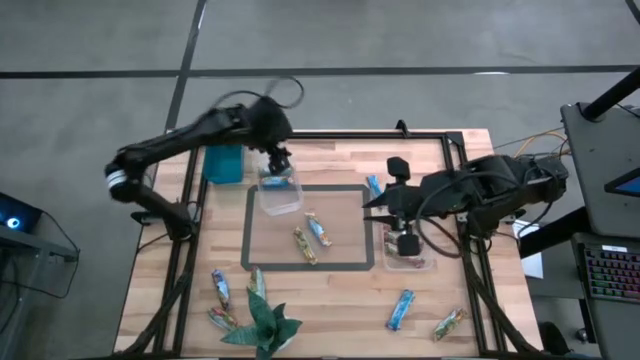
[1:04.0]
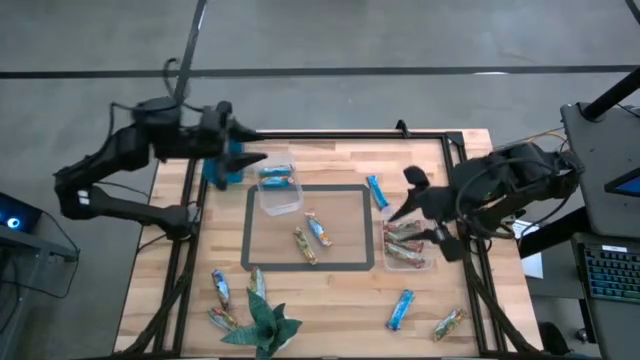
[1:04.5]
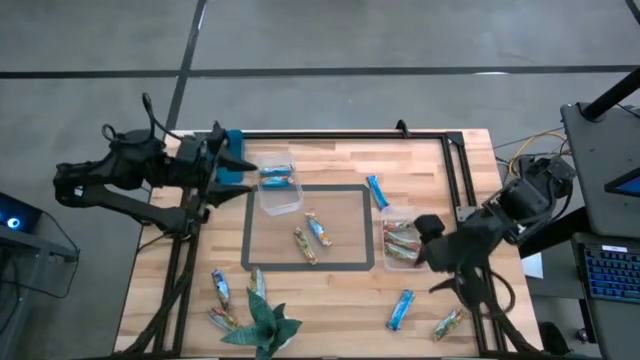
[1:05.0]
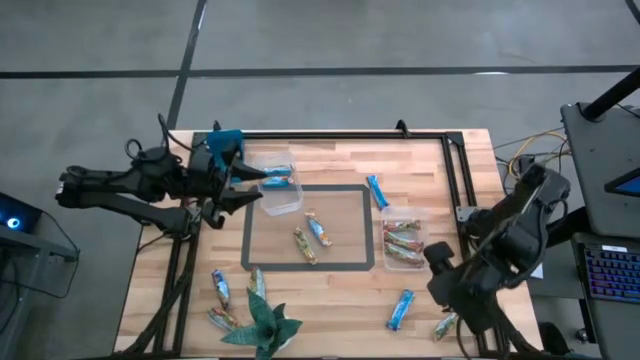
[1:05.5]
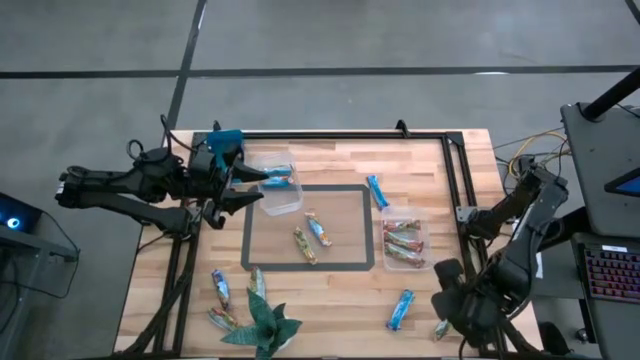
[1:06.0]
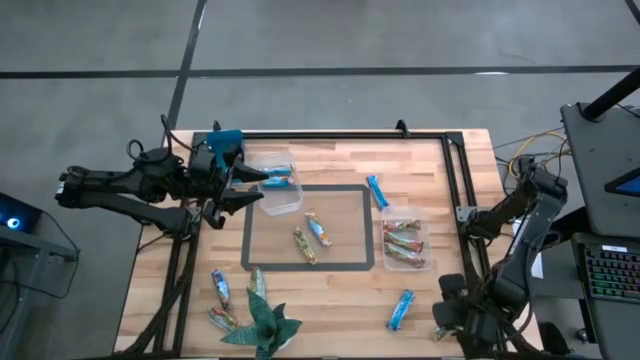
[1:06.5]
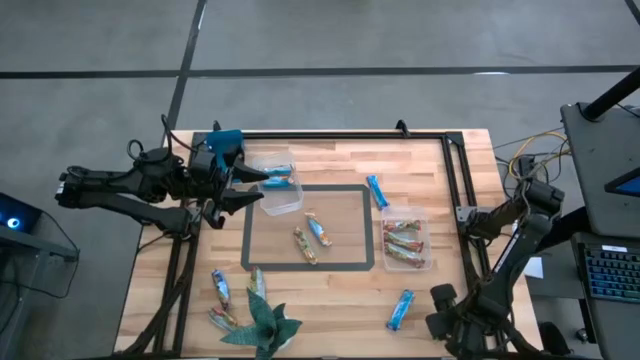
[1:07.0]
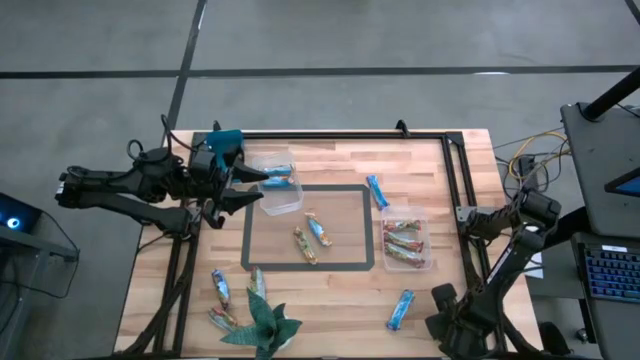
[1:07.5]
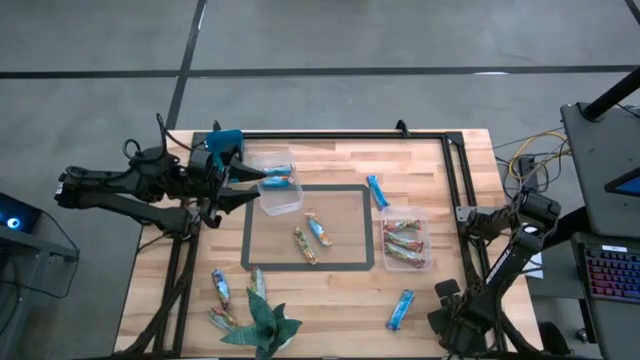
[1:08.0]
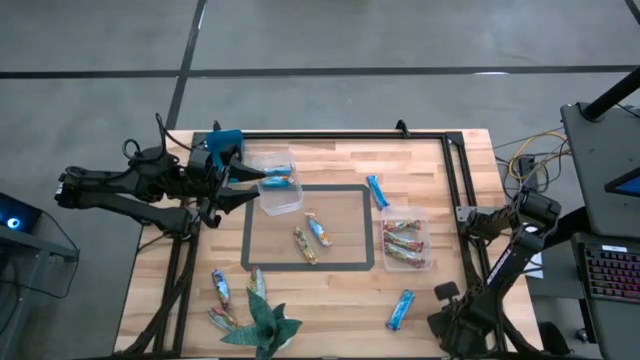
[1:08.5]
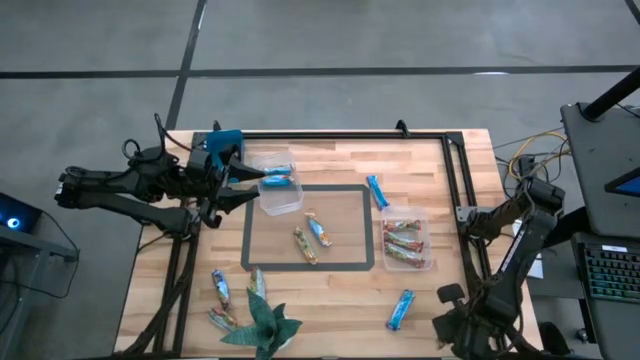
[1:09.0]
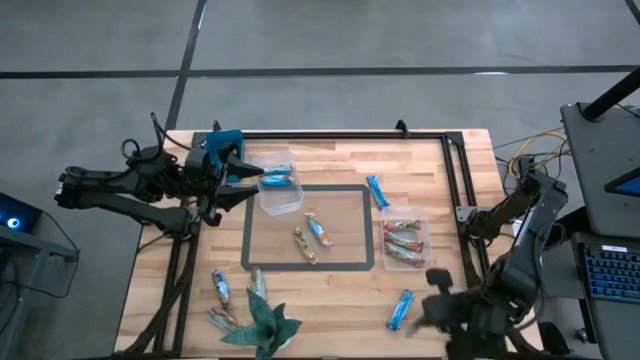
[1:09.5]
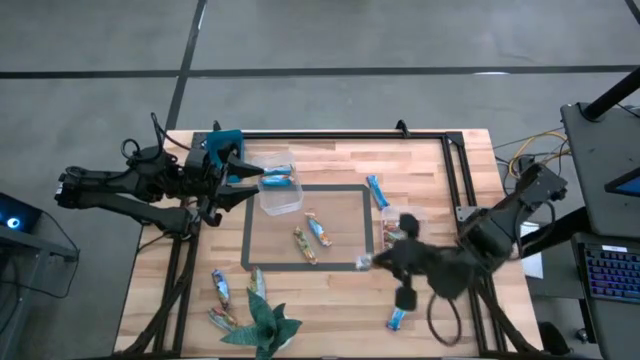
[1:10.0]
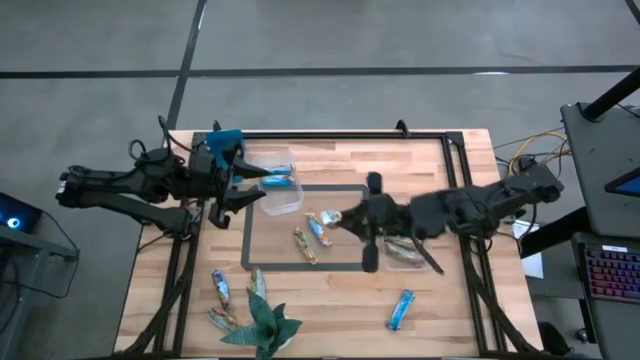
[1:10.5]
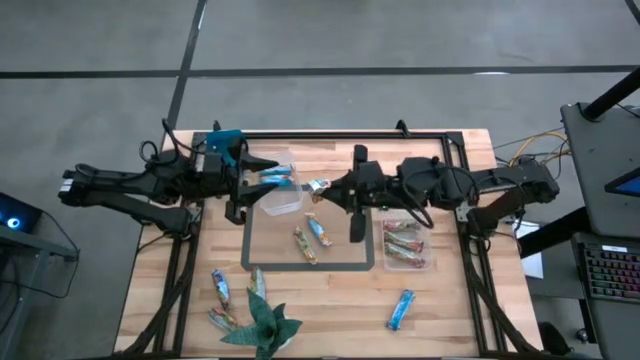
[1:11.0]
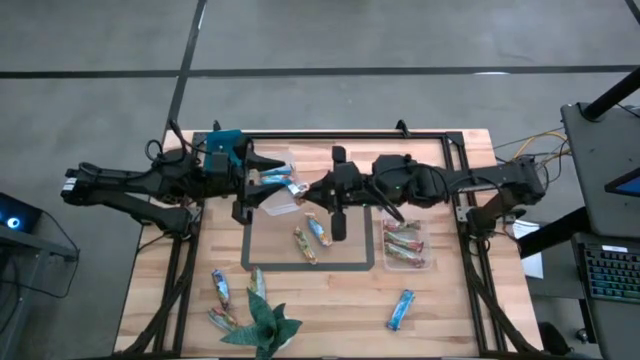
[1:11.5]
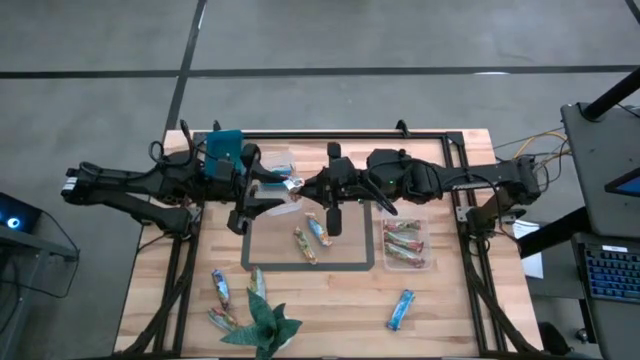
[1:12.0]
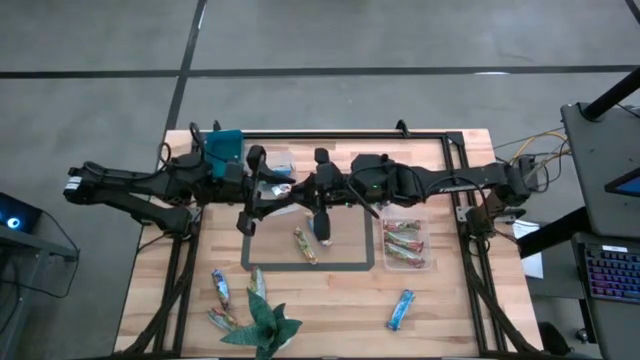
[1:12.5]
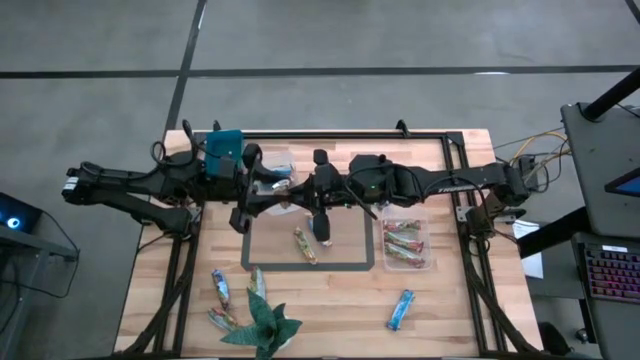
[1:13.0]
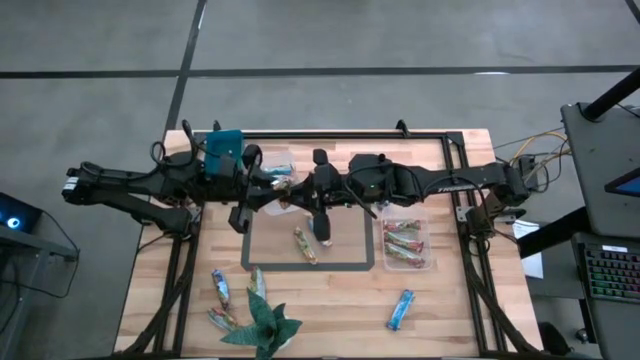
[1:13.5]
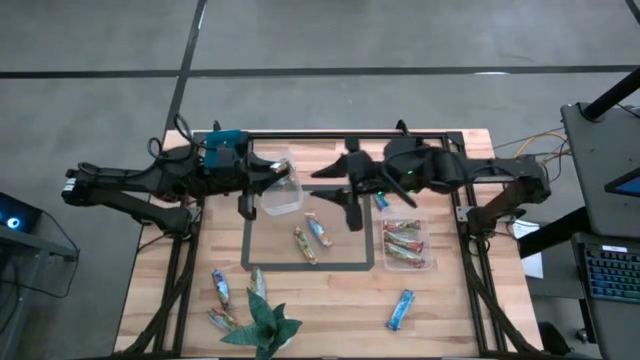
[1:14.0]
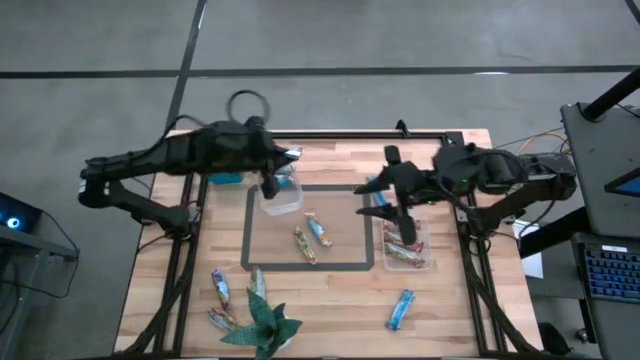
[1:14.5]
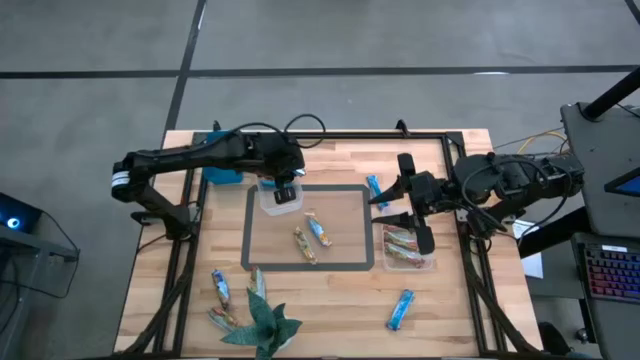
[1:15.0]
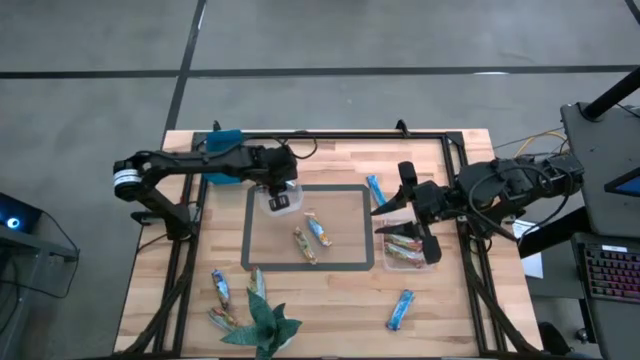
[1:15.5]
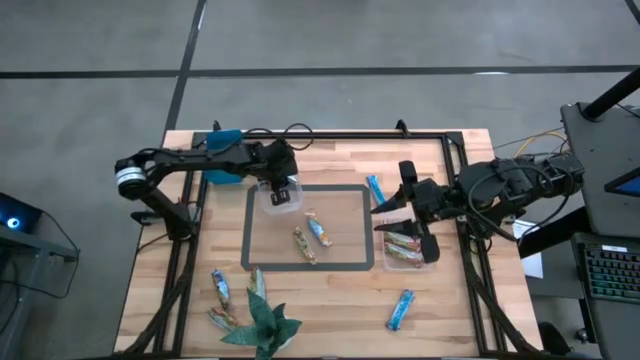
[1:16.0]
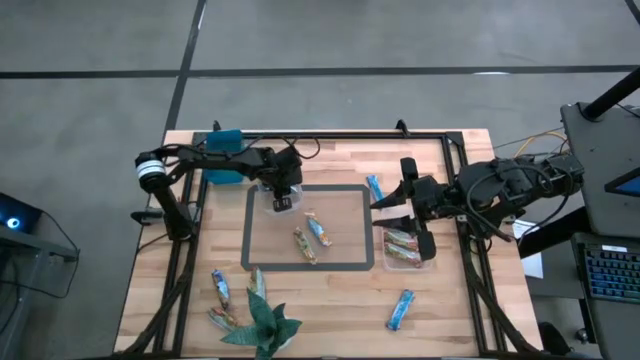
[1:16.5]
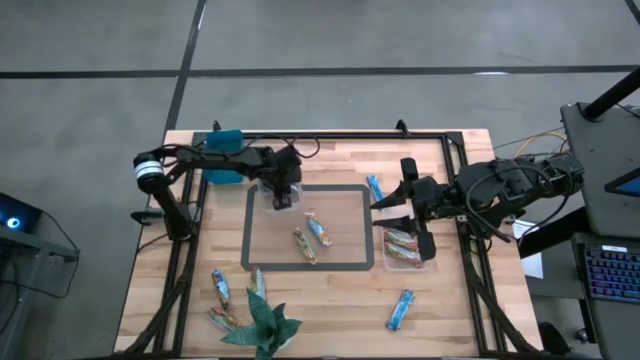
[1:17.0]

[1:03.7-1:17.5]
Task: Pick and place Granola Bars by type
Put the yellow granola bar into the left transparent bin

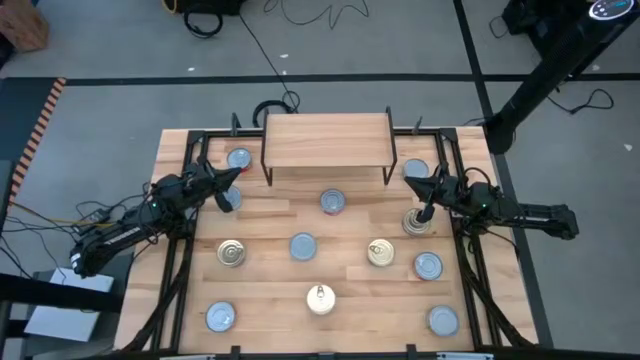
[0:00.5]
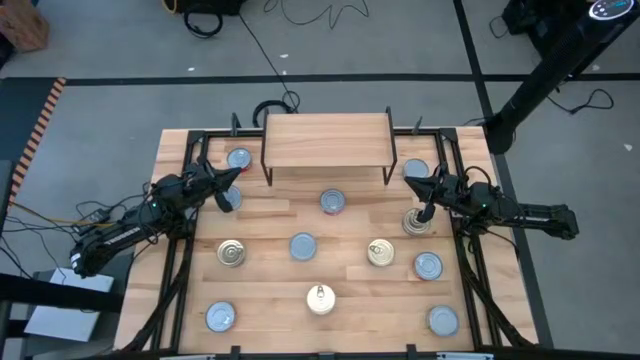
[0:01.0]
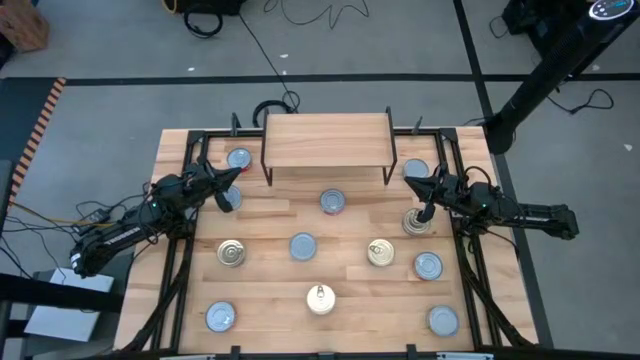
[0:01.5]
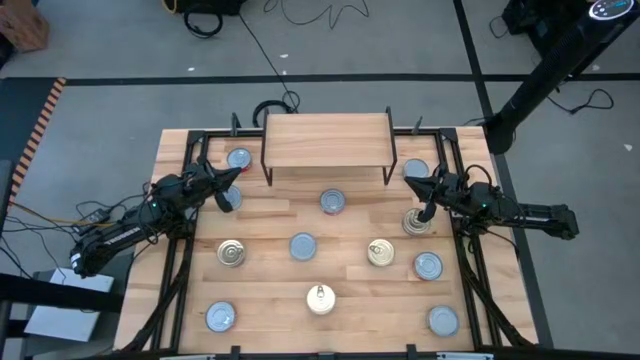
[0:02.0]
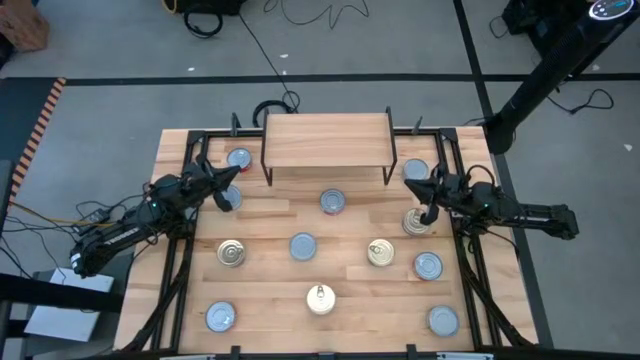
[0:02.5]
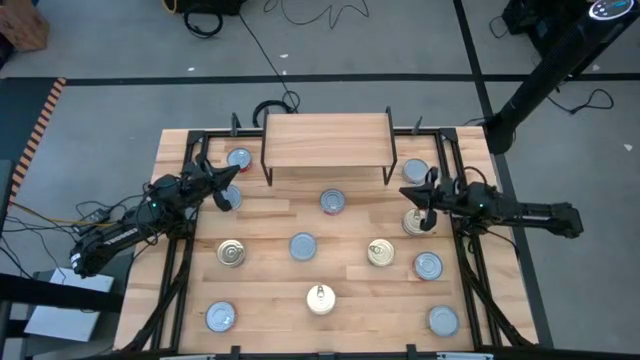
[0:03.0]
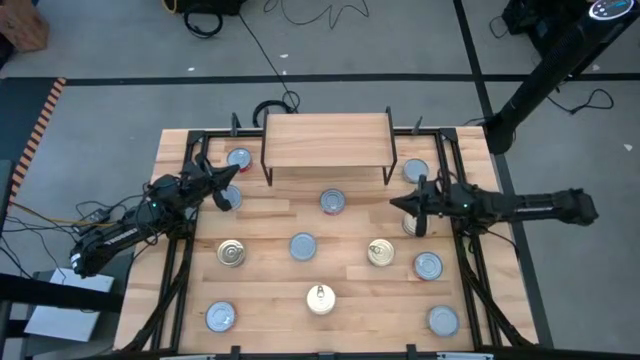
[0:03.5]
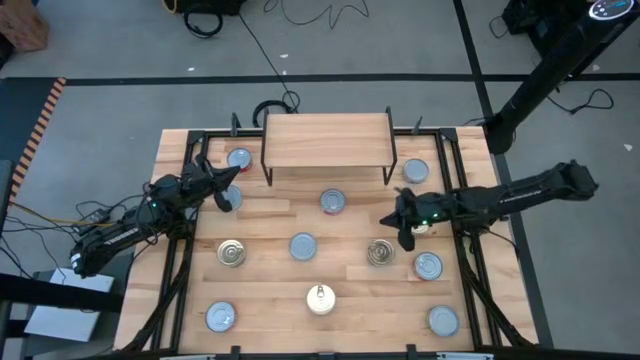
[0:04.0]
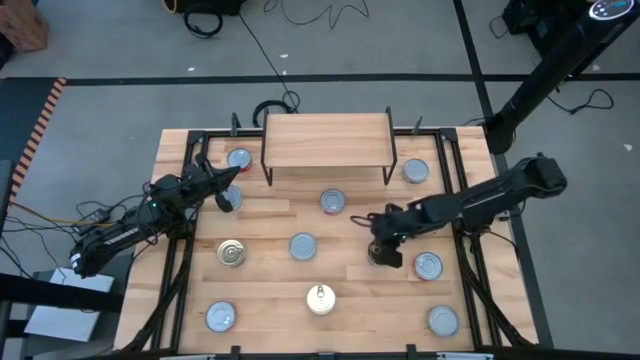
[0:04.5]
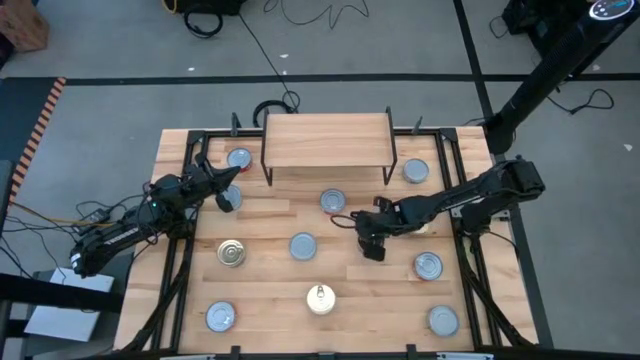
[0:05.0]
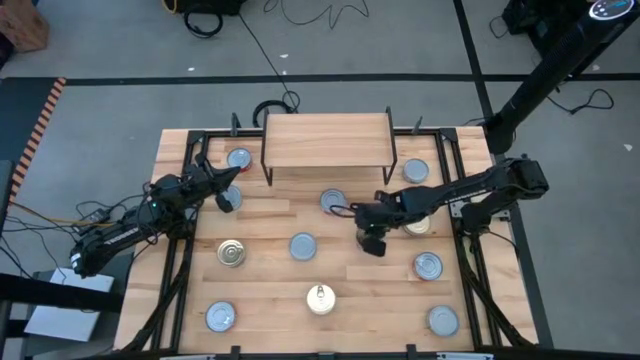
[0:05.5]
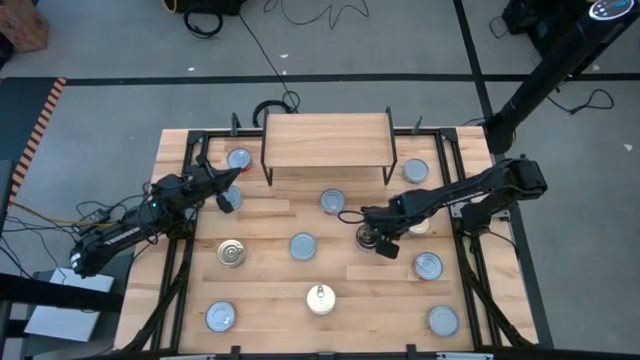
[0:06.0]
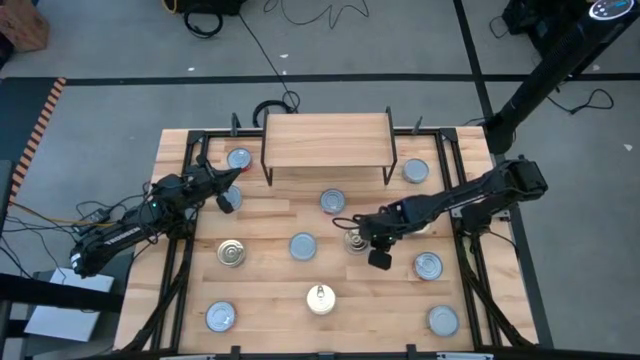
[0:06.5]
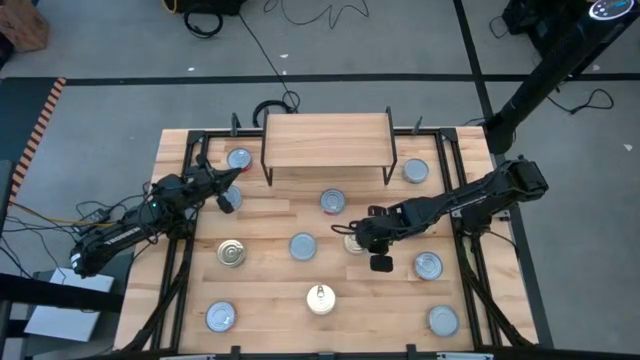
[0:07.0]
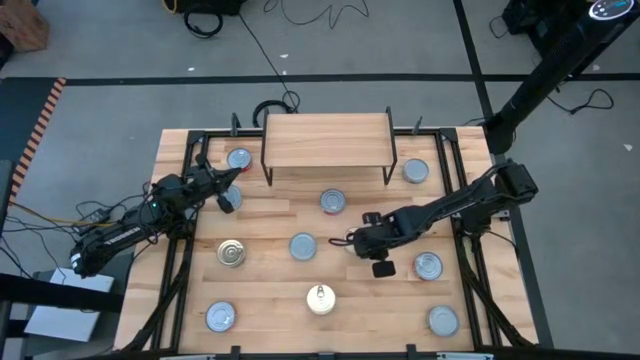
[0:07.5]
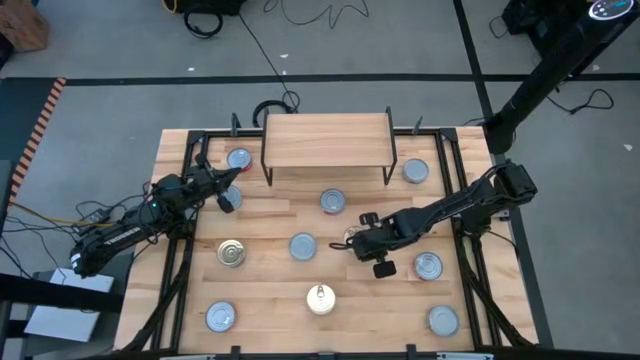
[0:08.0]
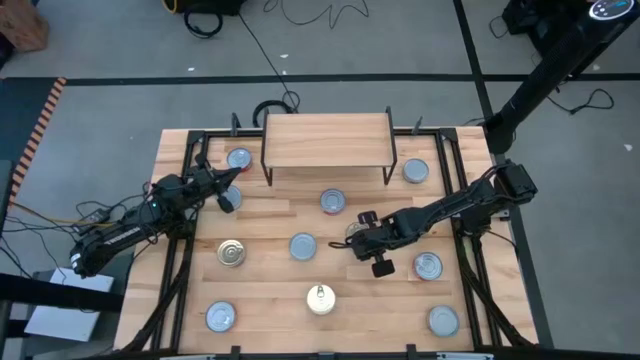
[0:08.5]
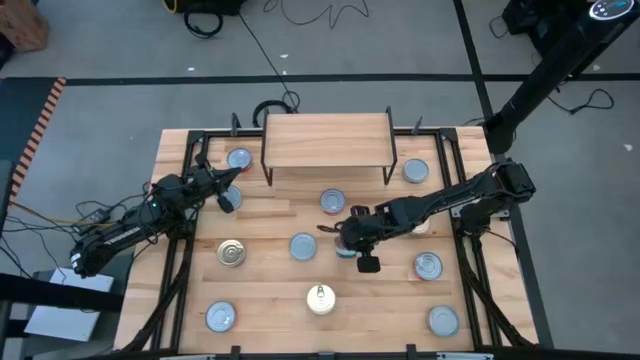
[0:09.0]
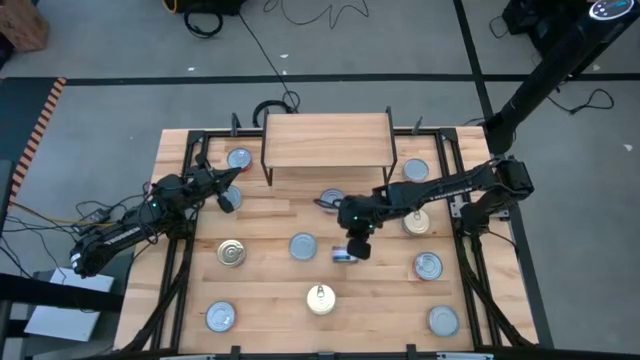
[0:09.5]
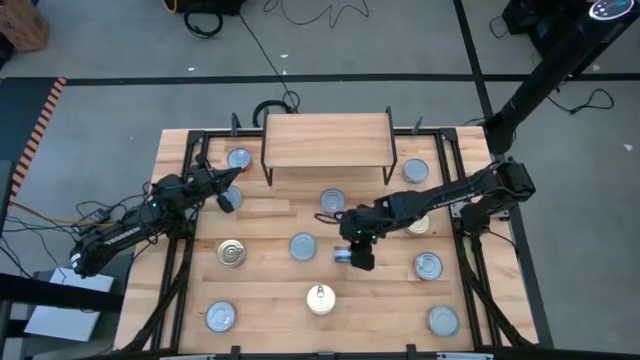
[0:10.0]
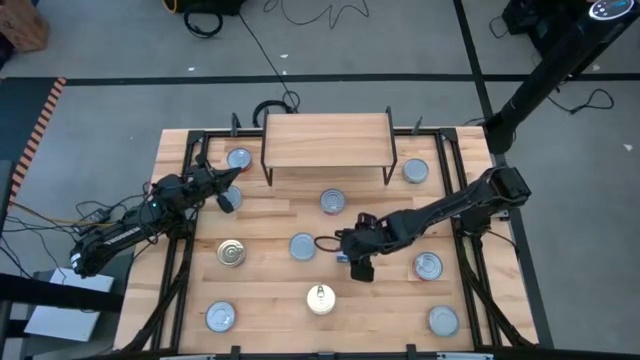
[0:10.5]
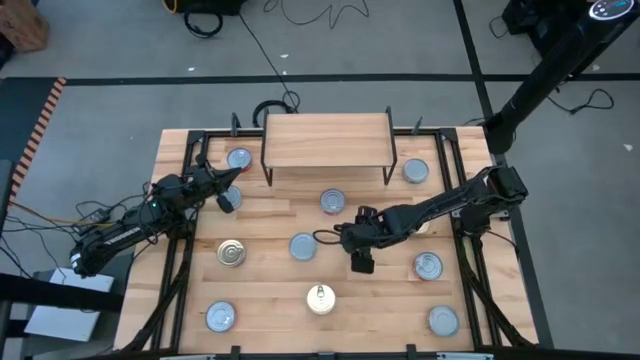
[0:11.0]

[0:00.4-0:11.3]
Task: Stack canned seafood by type on shelf
Put the blue pink tuna can on the shelf
